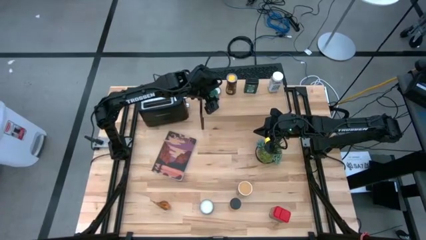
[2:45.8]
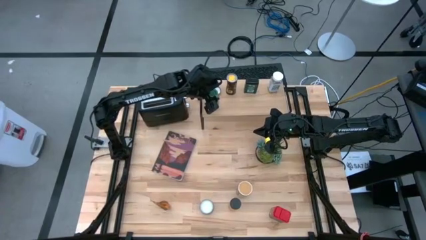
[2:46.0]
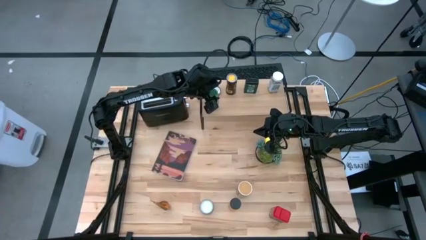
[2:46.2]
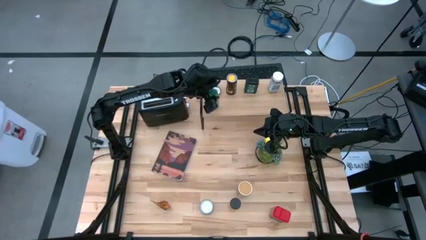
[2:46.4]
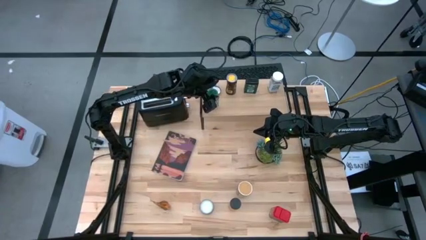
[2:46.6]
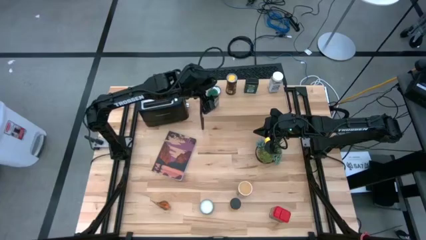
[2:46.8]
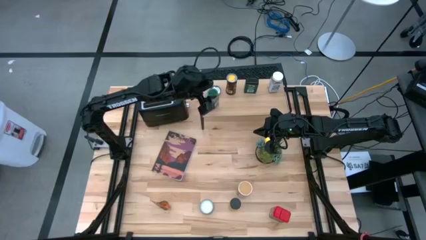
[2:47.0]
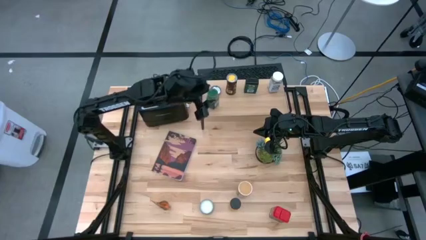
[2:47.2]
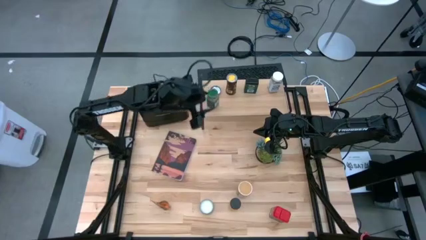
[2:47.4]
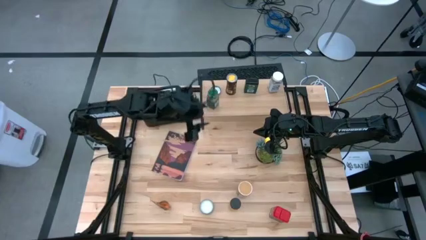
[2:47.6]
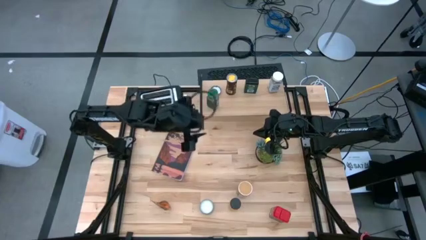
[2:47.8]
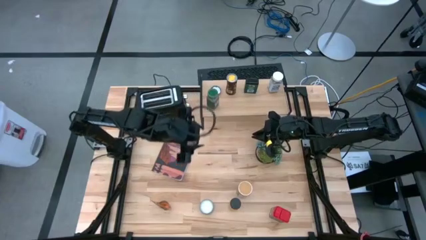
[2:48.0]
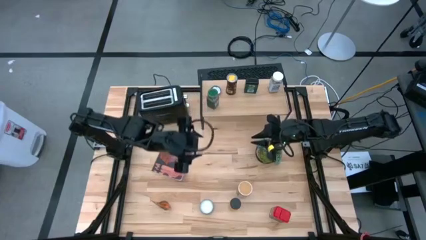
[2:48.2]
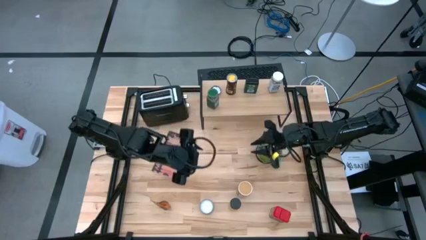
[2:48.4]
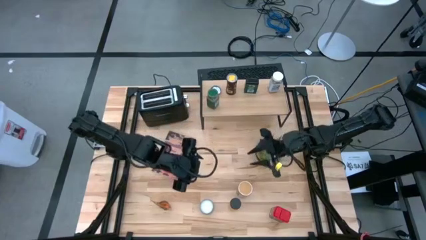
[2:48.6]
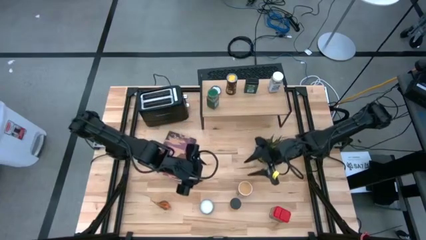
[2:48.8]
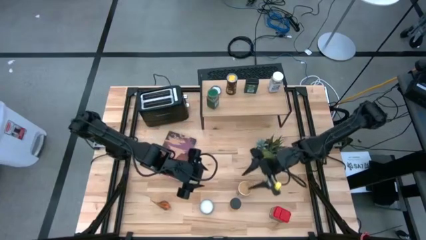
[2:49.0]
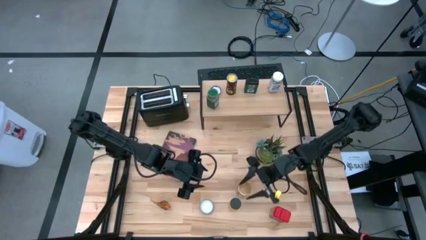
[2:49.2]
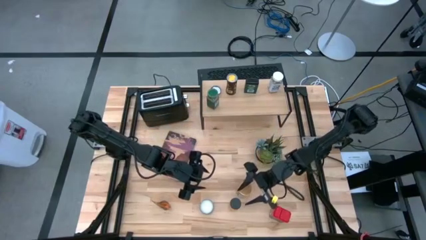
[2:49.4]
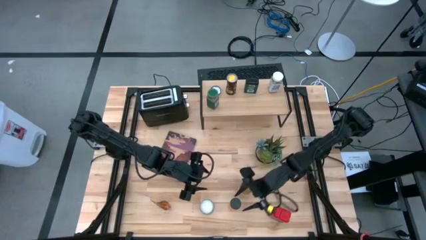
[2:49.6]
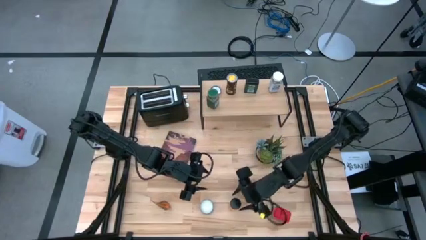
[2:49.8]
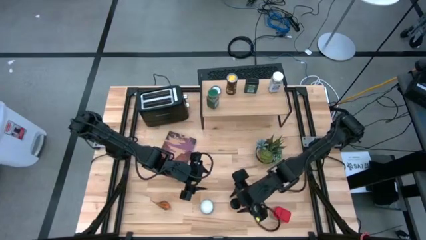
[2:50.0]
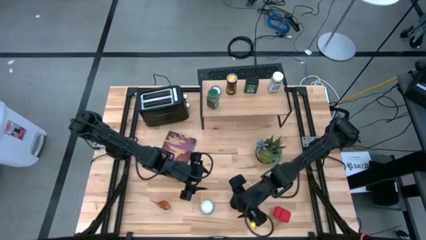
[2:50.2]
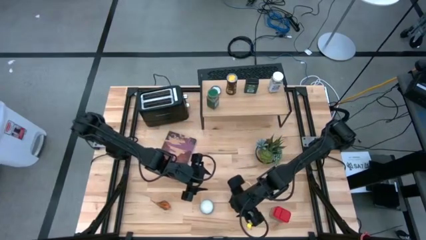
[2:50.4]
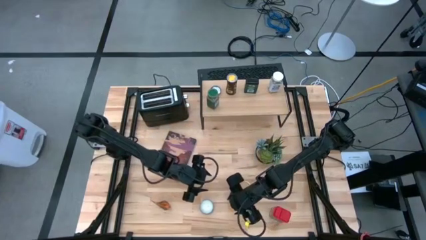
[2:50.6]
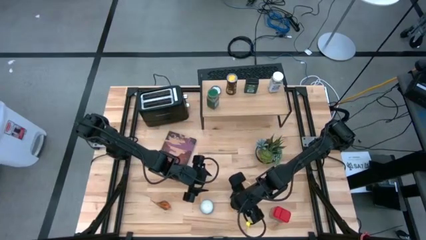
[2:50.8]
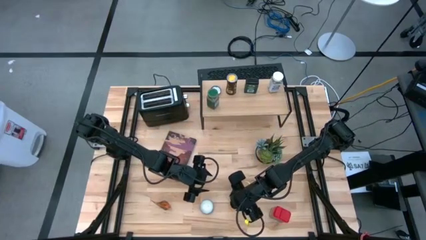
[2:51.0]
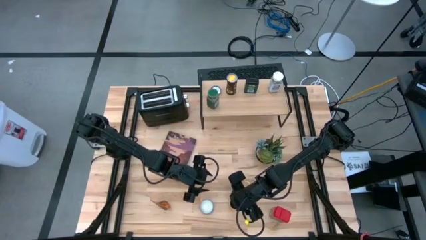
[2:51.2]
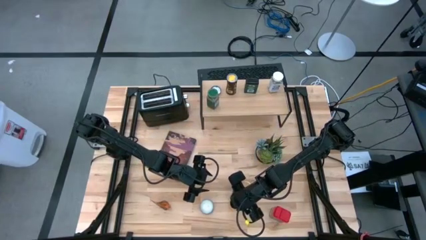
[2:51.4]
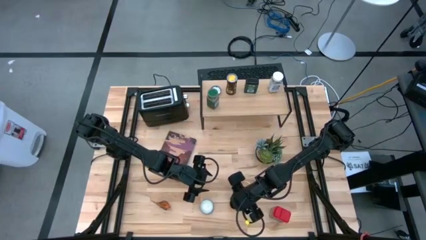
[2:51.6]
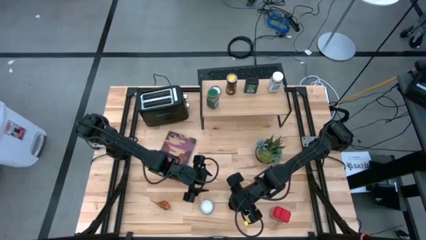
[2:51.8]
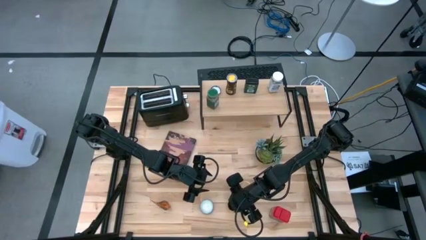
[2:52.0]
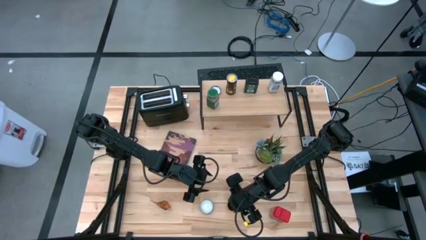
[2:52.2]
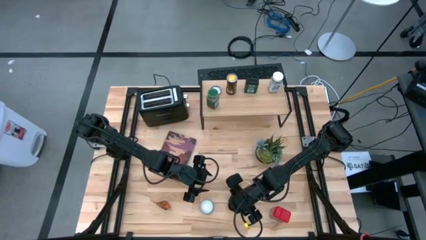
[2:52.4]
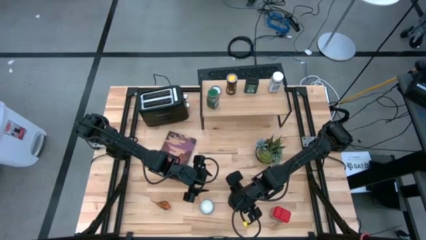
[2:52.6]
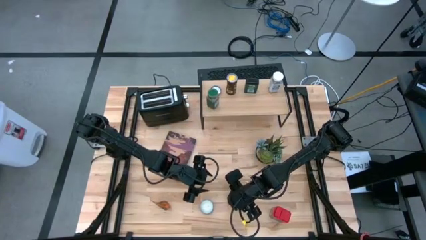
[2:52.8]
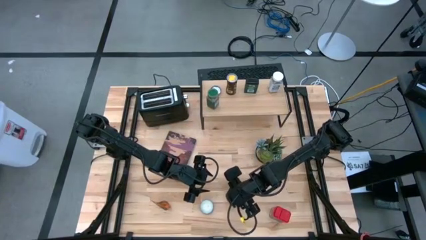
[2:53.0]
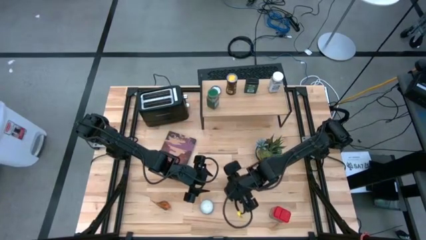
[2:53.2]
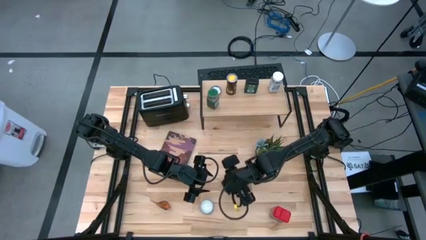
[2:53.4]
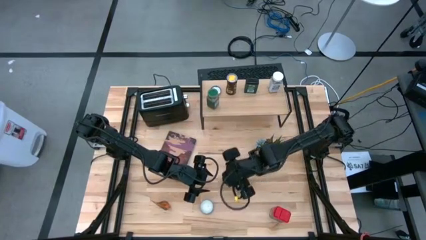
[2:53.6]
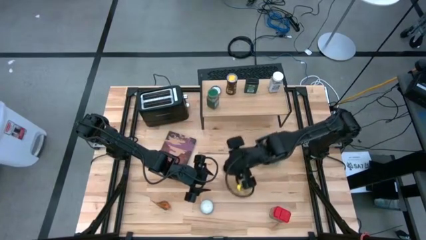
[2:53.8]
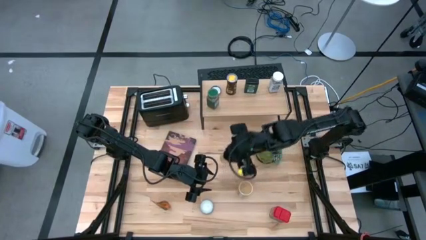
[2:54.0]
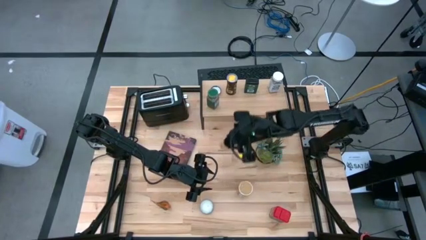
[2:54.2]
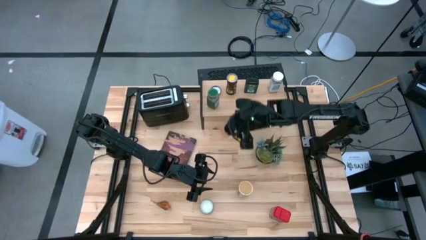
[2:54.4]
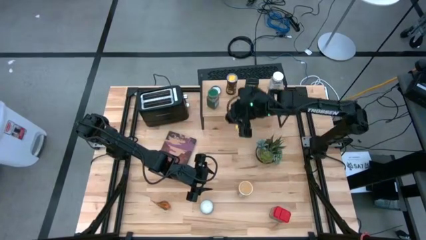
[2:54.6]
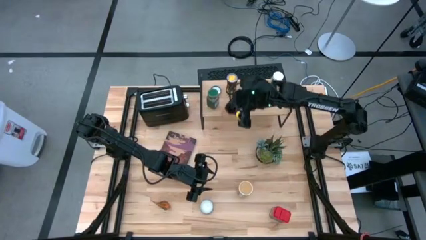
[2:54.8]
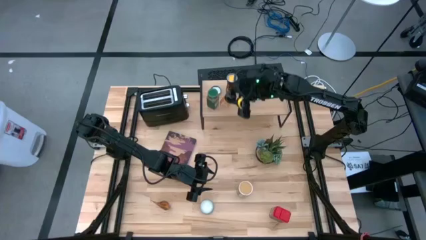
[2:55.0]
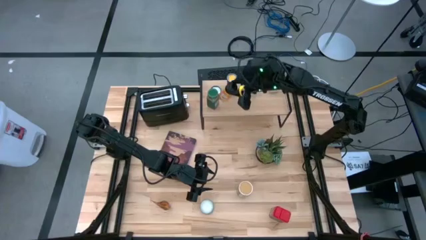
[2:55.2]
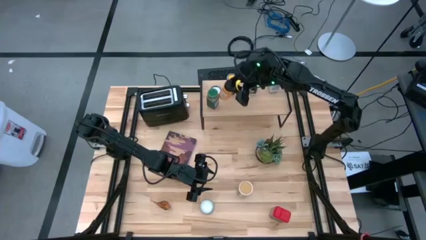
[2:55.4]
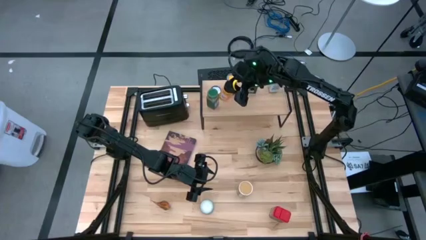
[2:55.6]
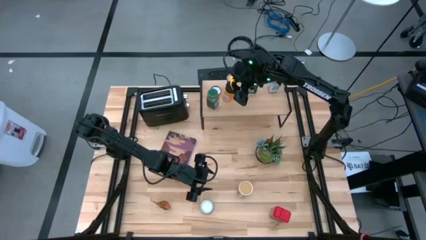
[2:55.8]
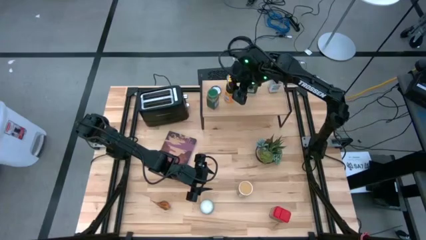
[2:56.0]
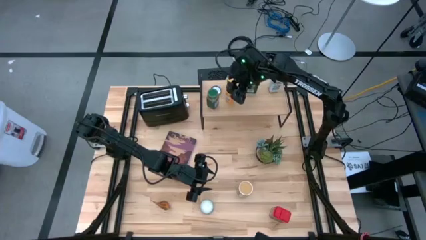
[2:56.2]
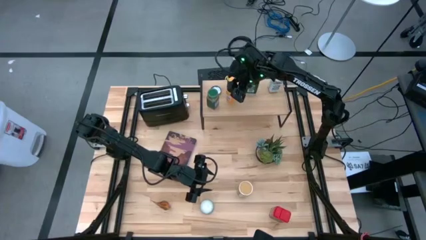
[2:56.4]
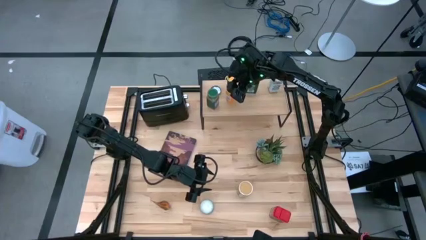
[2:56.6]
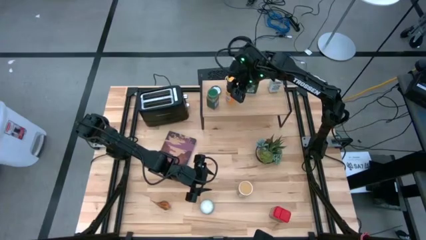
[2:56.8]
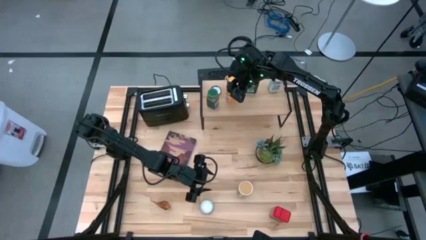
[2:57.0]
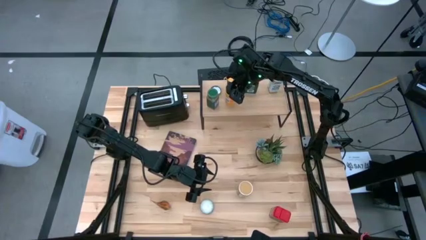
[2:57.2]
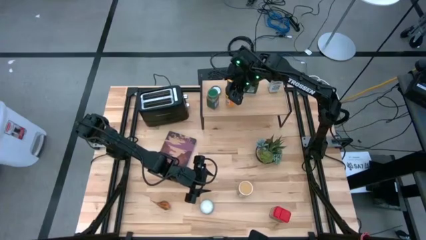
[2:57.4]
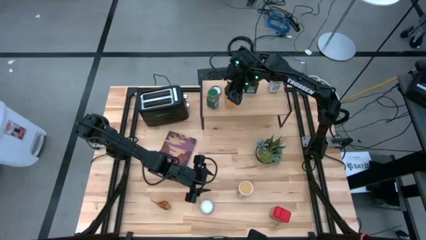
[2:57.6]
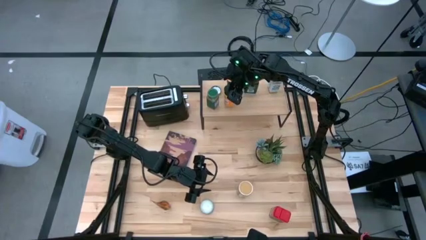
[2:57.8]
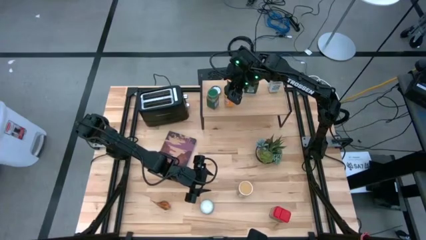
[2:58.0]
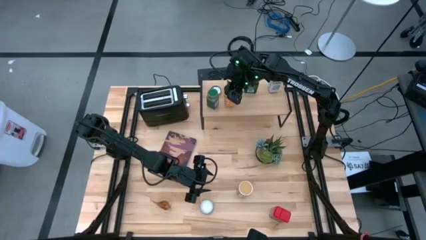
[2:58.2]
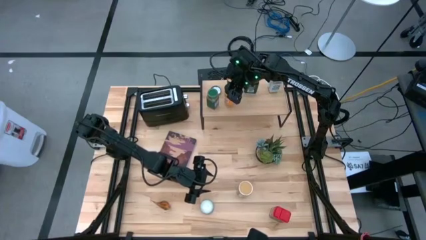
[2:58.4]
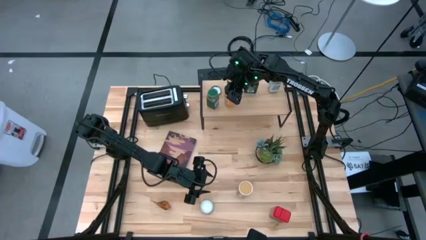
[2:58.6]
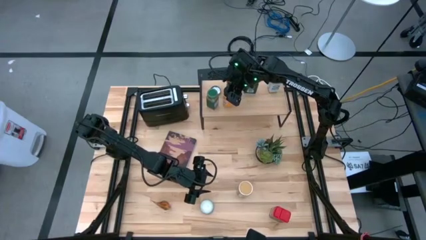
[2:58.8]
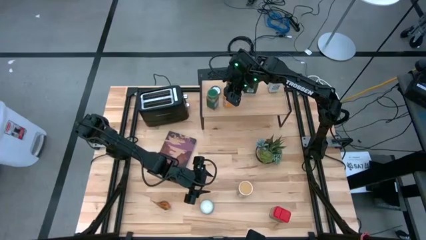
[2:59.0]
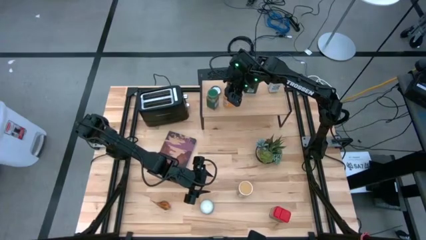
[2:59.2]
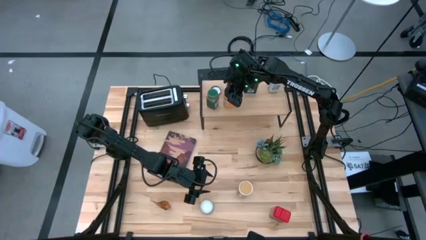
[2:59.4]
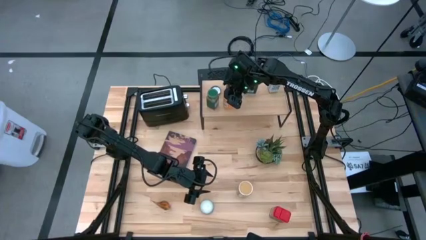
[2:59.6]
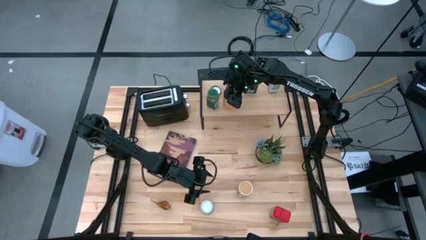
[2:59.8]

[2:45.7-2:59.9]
Task: Shelf spices
Put the black seasoning bottle on the shelf

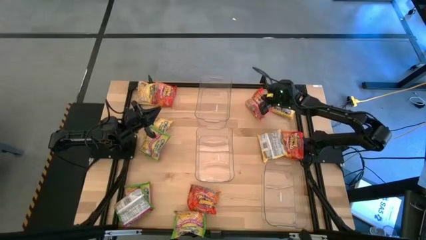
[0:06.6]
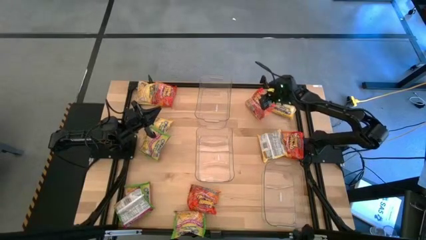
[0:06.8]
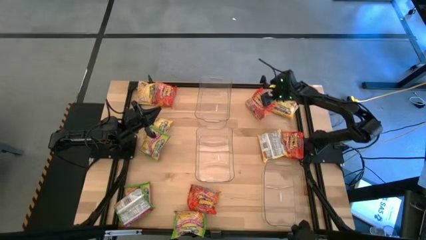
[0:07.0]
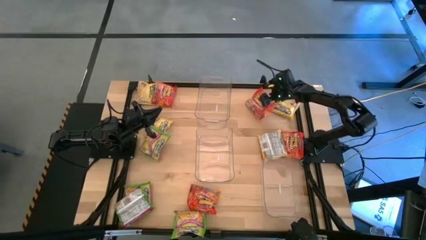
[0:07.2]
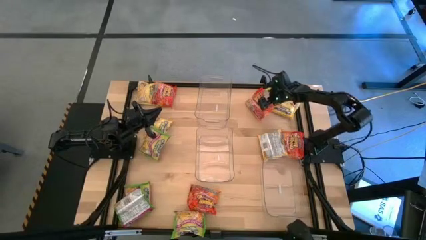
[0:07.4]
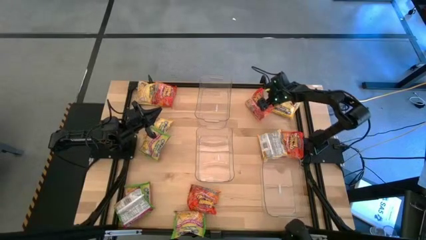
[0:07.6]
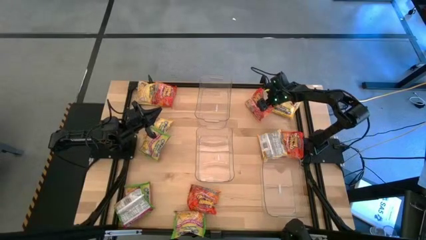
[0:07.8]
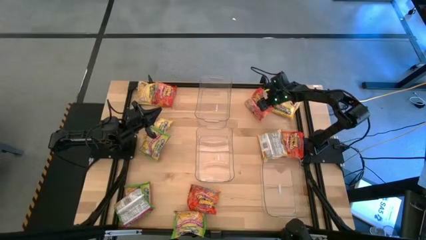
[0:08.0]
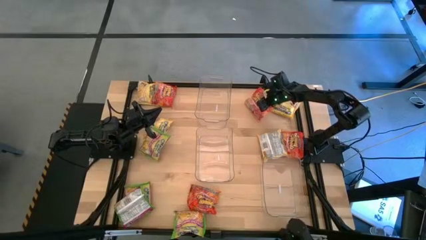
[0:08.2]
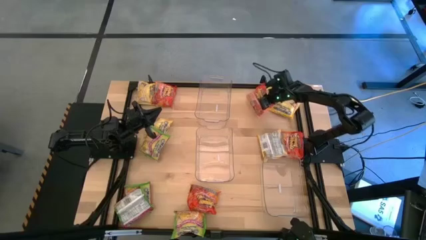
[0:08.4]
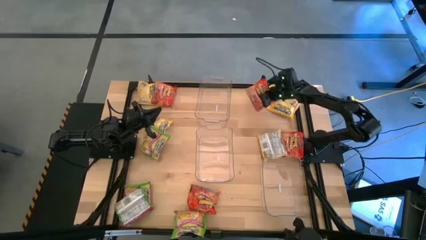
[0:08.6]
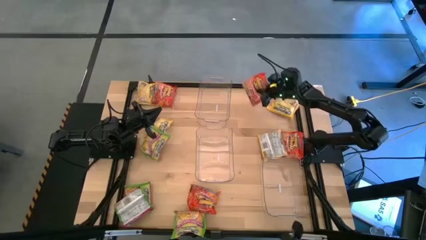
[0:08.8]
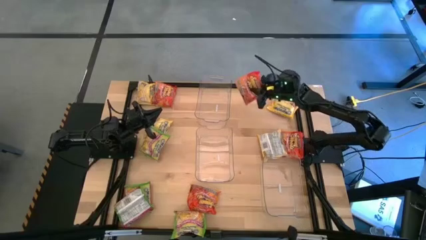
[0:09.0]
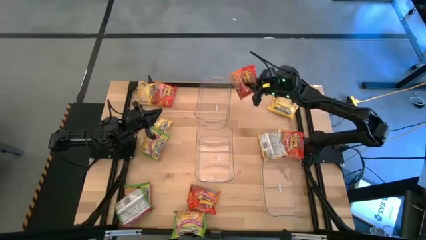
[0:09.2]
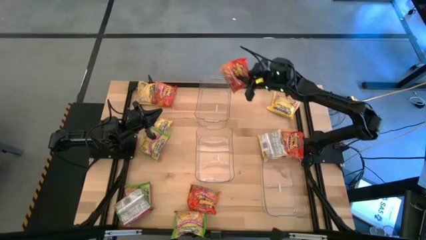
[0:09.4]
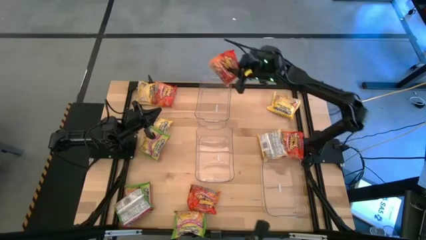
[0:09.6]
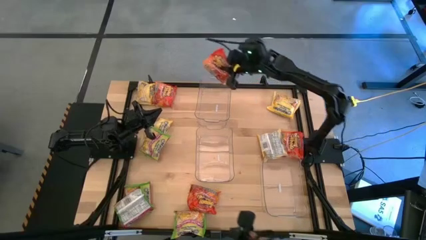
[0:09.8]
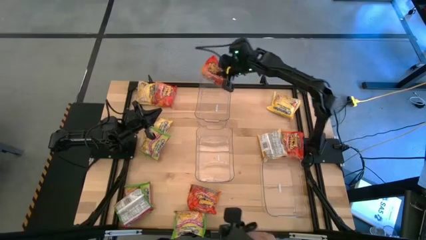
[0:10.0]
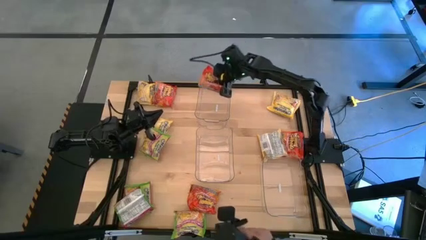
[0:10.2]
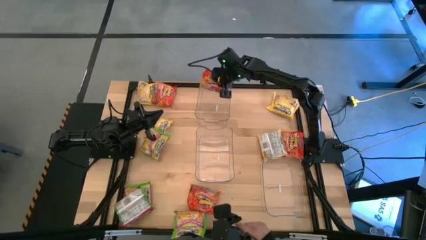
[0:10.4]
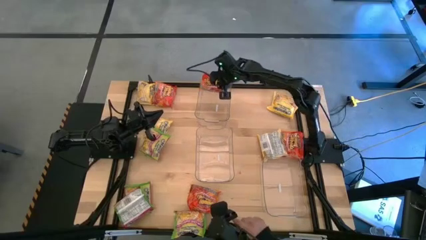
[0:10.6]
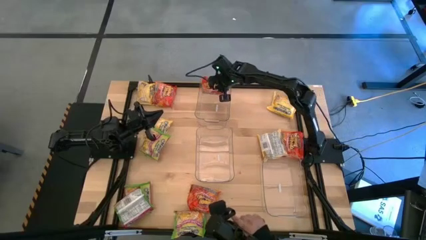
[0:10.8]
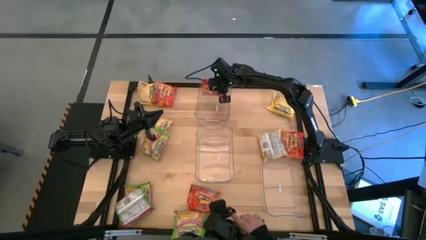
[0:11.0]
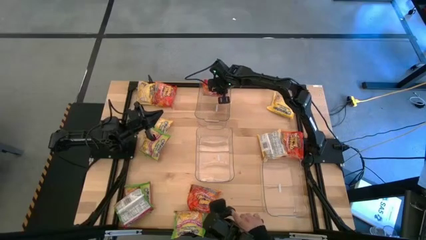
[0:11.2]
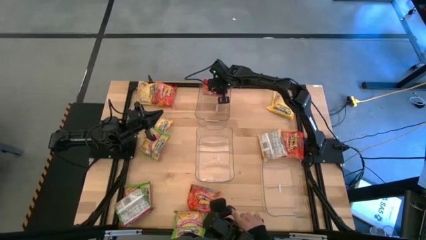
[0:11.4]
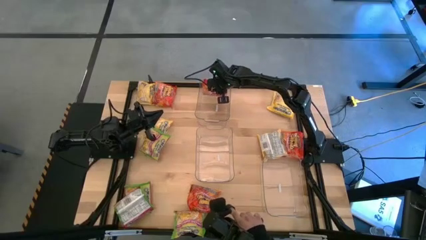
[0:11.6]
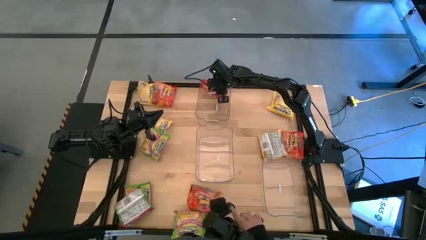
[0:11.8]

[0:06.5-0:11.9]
Task: Sort Maruchan noodles
Put the orange noodle pack into the top transparent bin
